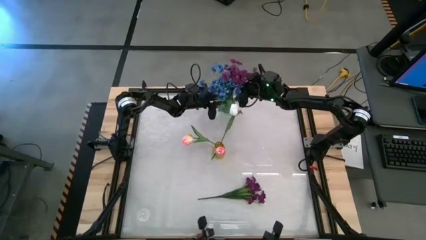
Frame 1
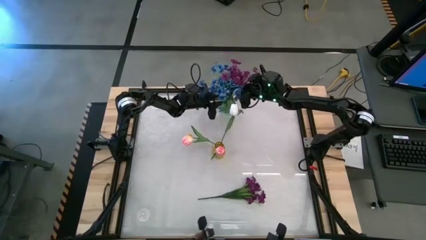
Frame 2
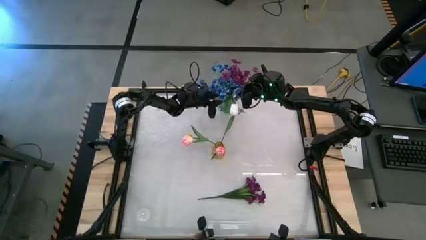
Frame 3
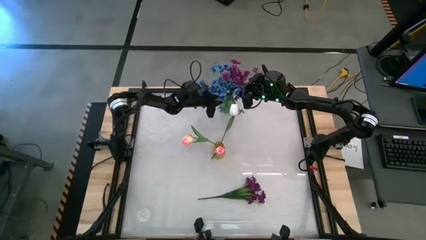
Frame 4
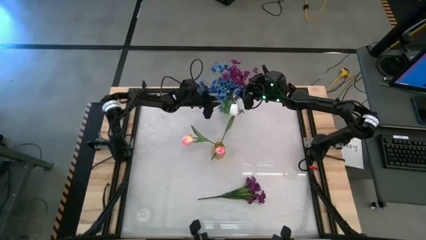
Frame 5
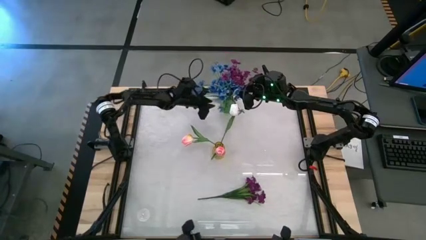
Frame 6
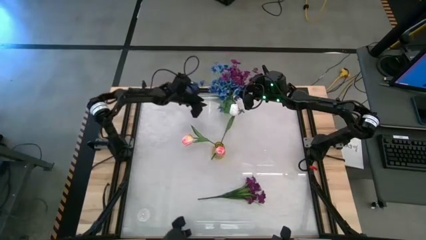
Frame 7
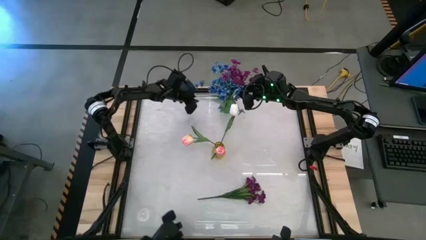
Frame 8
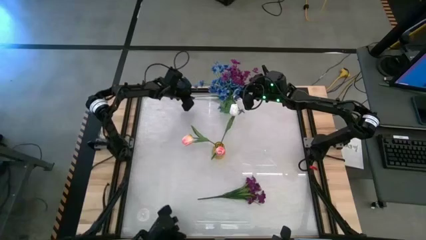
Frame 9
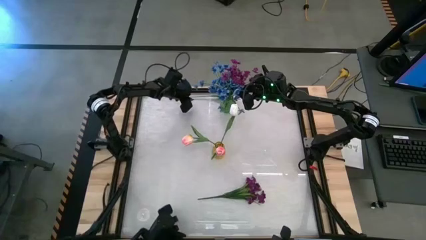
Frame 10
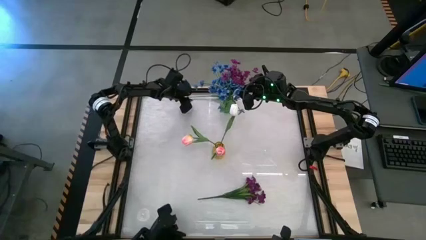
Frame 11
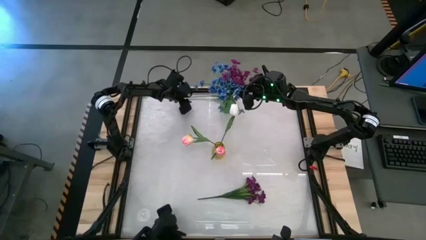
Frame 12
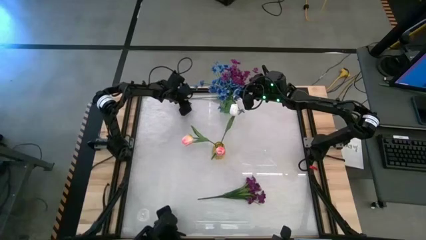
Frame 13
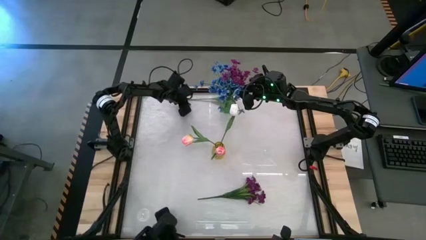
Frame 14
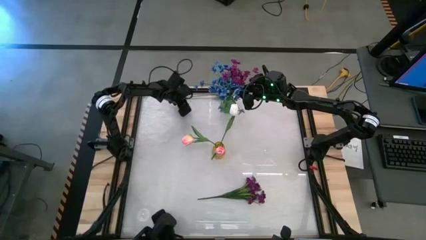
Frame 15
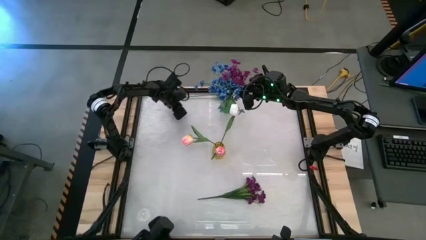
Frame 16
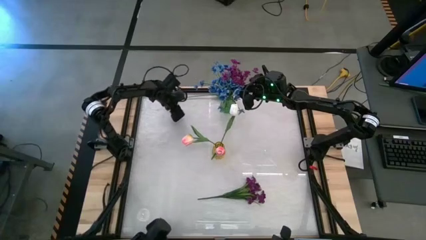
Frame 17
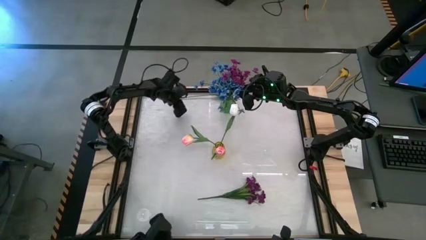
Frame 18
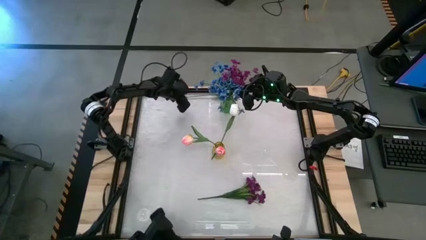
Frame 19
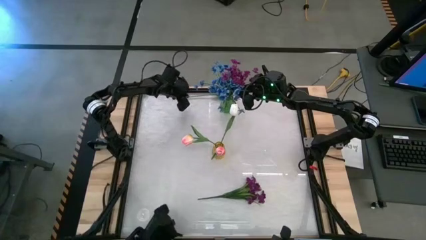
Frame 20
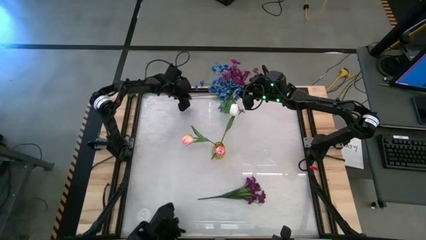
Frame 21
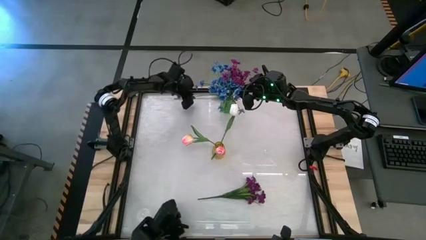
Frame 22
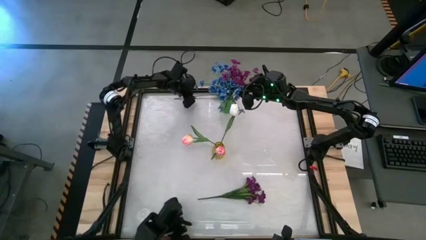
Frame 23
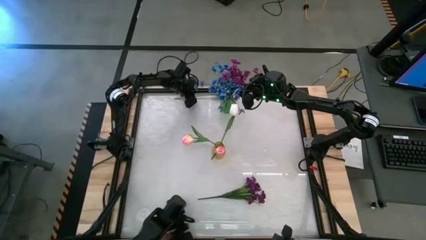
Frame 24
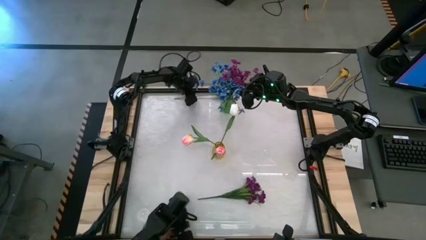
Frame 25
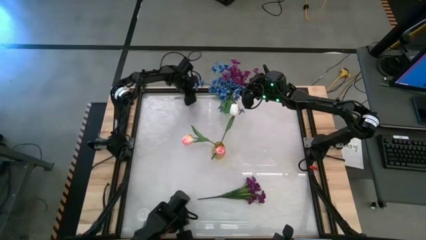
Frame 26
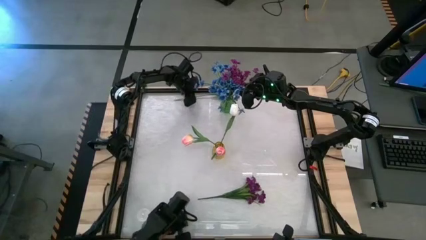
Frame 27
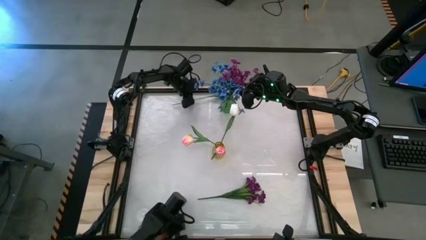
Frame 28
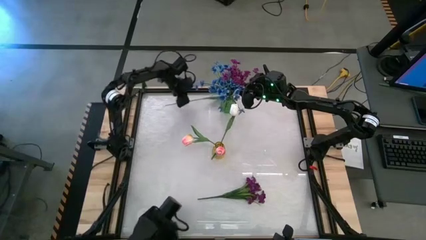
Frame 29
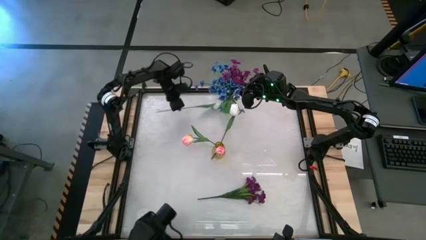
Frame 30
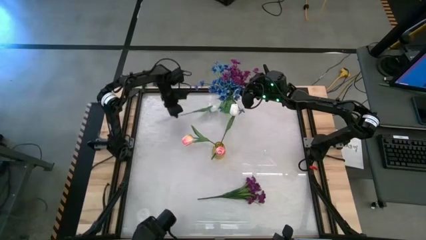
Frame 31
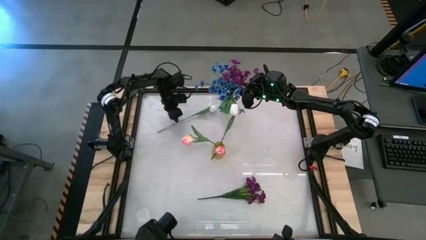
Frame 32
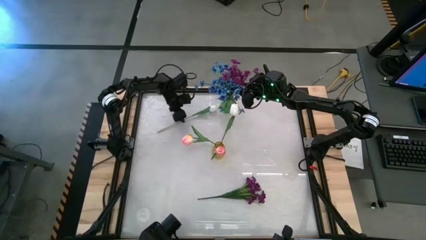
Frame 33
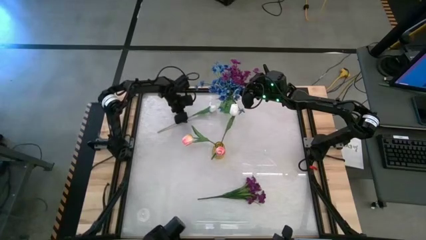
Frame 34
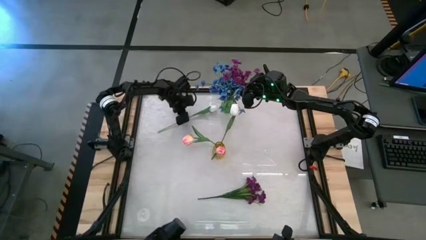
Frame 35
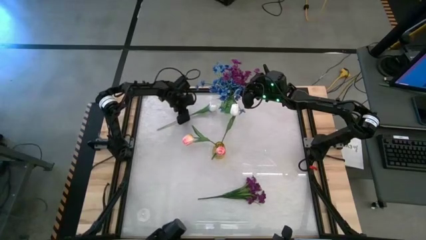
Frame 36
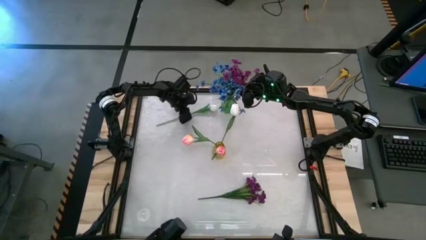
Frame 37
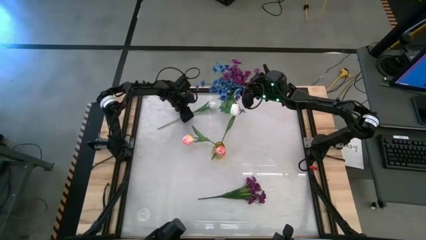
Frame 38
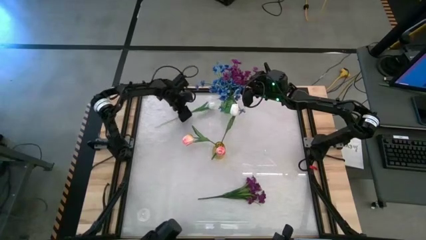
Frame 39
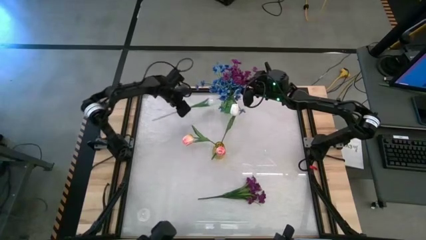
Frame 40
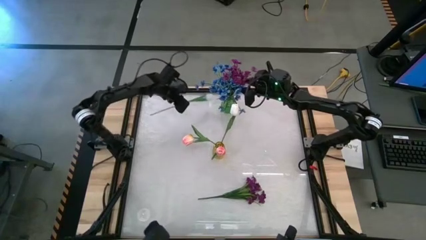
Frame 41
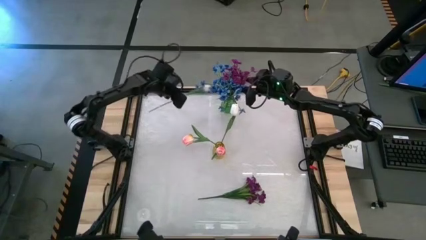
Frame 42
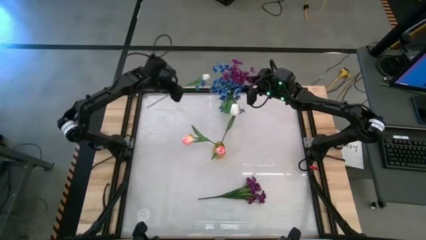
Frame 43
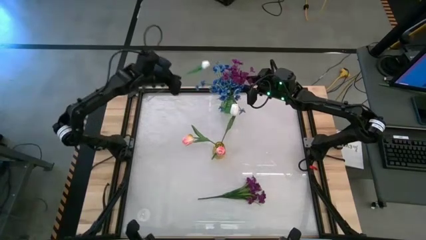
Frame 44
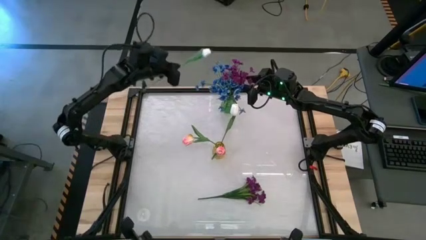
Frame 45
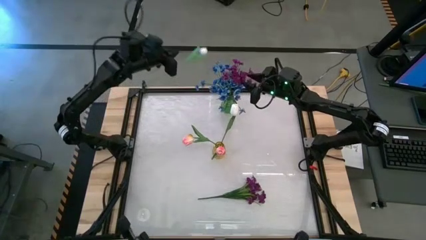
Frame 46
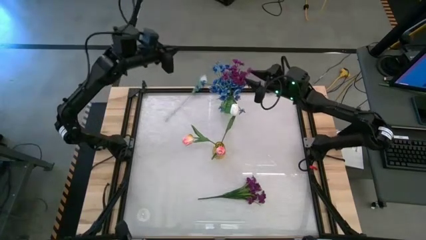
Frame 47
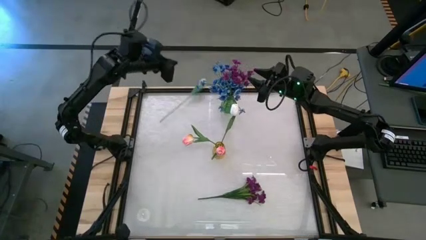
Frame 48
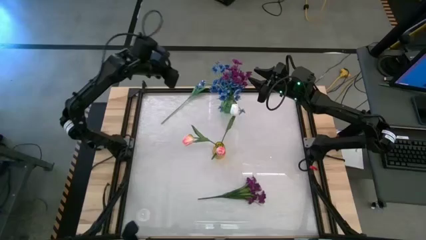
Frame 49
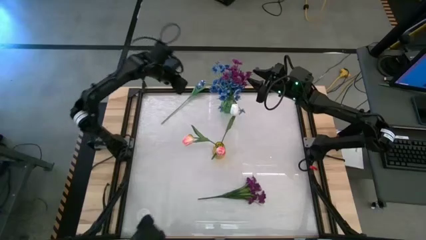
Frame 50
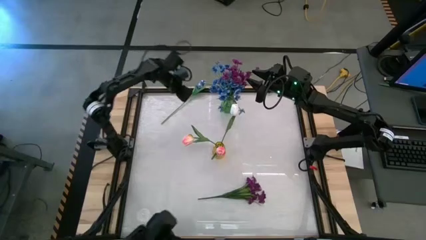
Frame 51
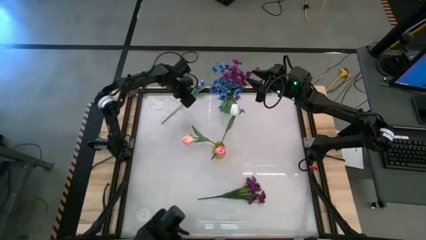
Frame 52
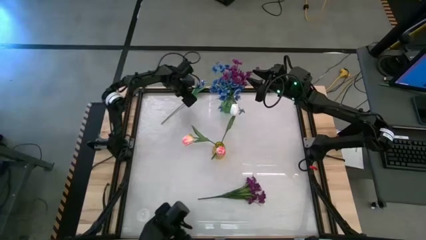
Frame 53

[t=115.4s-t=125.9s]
Task: Sort flowers into vase by color
Put the white flower into the yellow vase

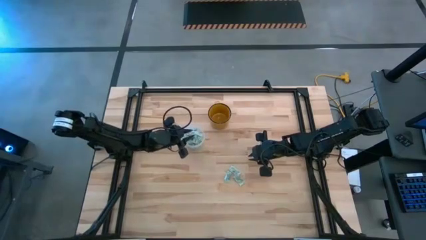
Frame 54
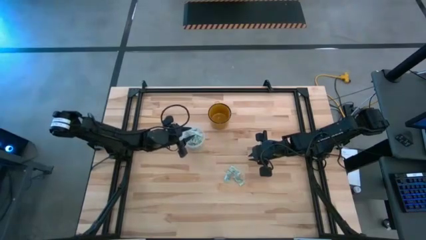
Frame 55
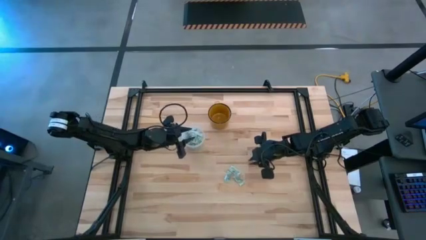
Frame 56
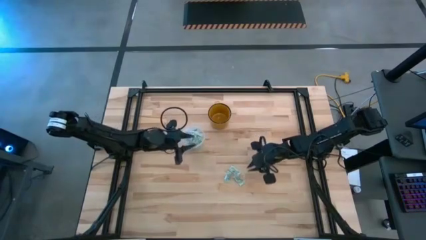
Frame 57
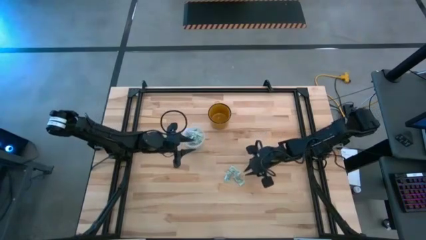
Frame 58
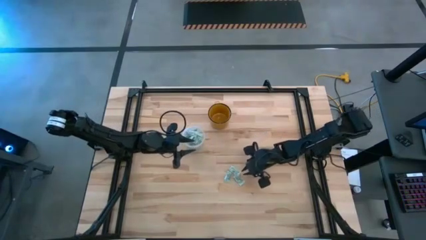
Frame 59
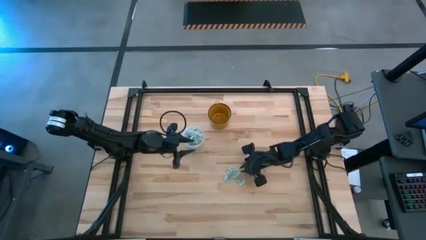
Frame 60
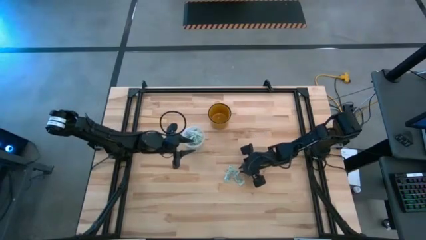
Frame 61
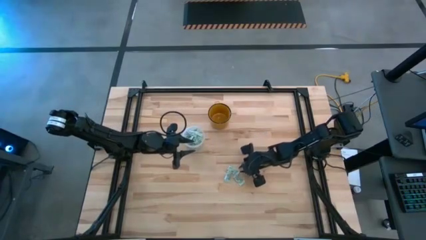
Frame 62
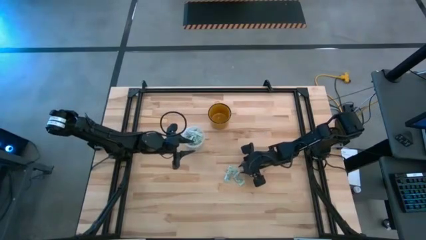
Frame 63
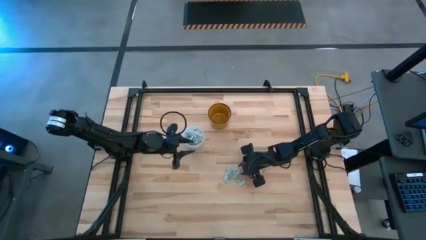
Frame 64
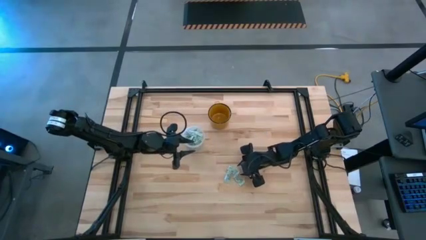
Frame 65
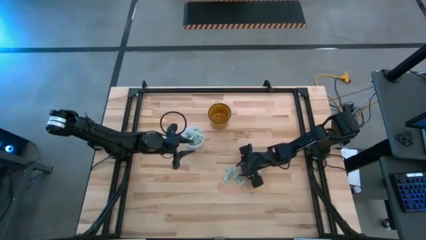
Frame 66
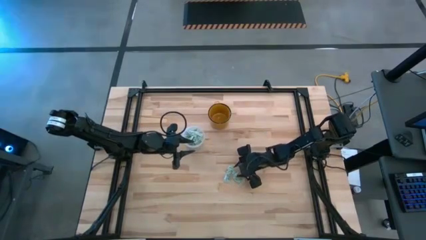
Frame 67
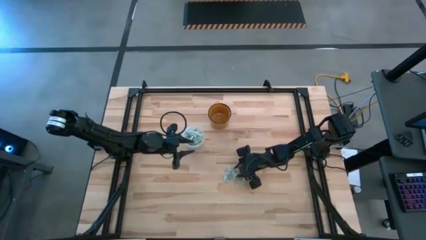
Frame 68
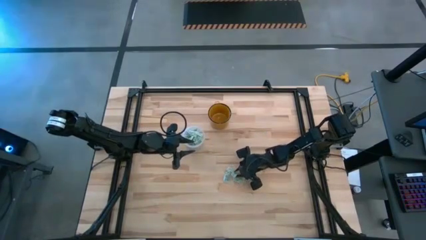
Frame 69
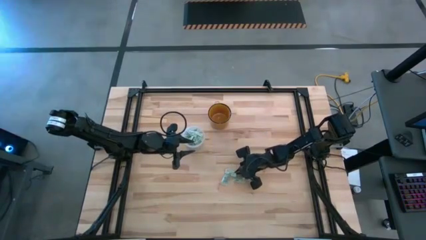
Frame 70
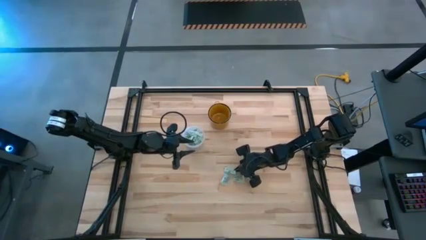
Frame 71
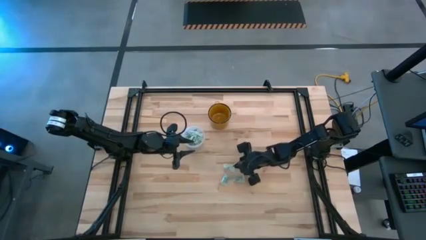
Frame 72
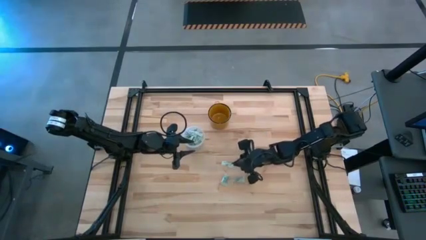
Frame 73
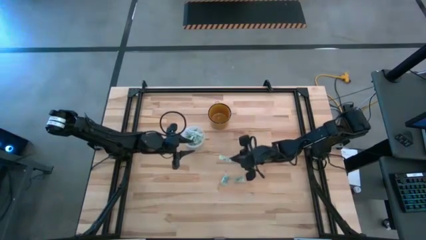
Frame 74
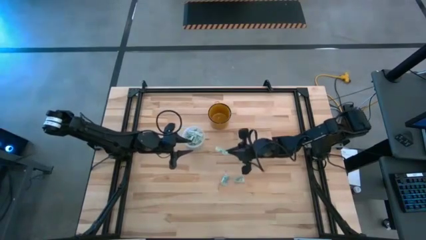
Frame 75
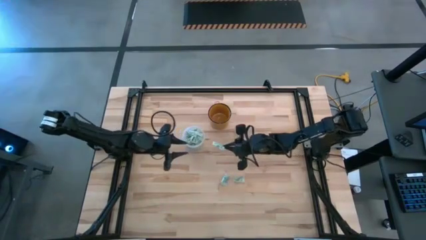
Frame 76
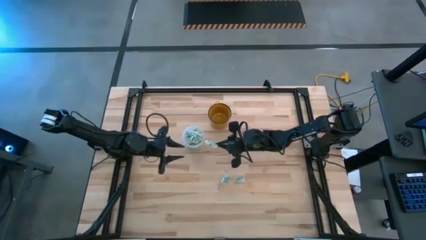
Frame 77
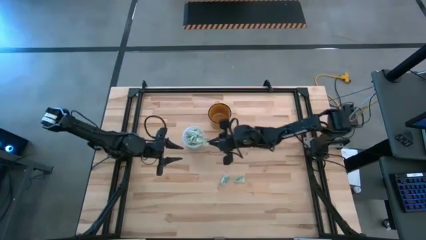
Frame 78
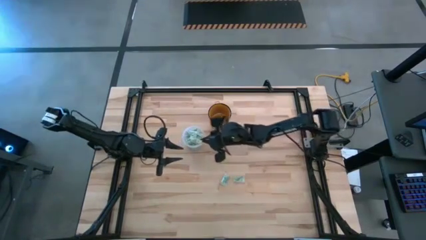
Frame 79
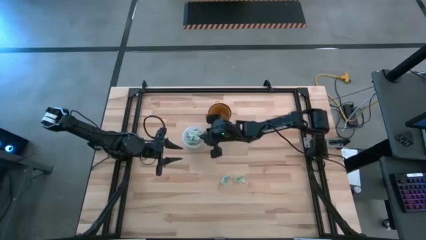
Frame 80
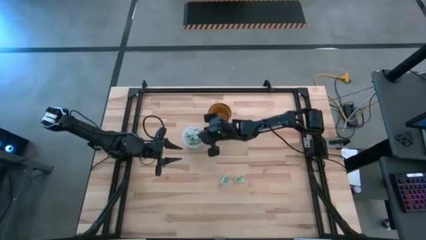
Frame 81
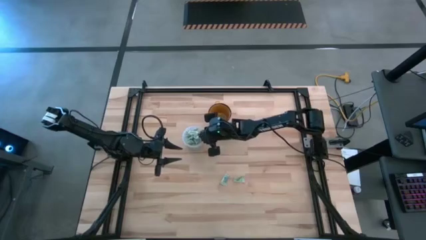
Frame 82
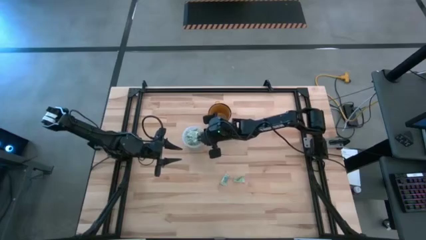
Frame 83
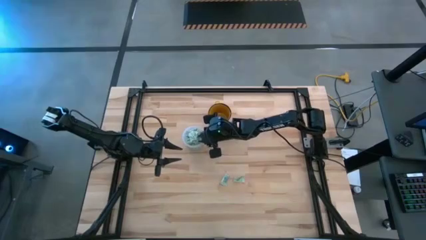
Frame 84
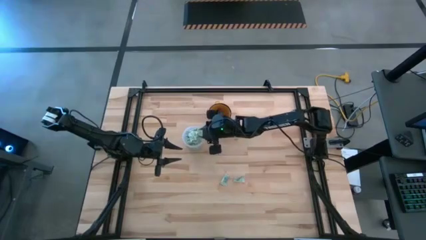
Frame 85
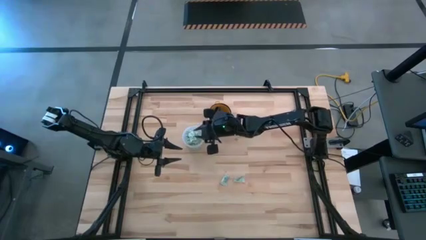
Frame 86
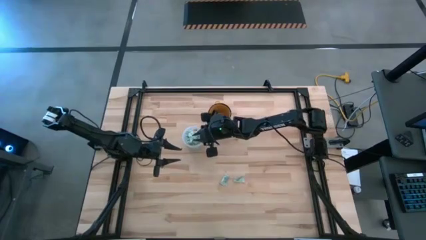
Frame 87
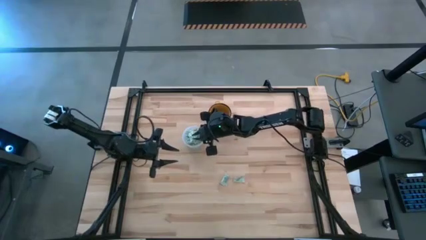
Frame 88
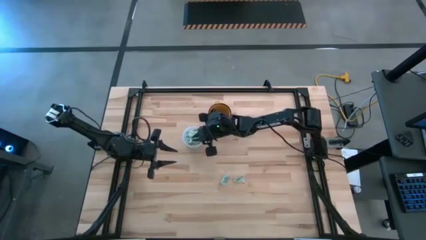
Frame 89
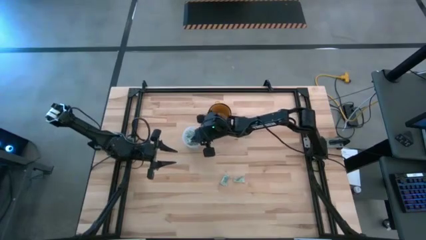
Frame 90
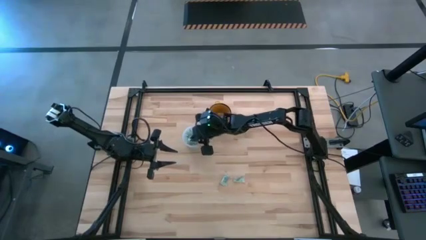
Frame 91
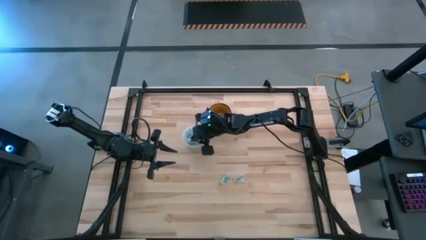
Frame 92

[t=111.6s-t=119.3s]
Task: Pick and place Stevia / Truvia into bins
Put the stevia packet into the transparent bin
